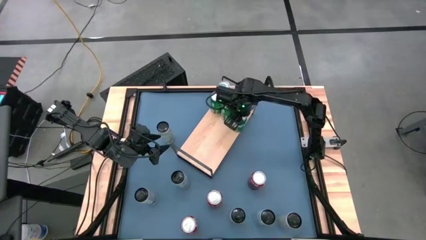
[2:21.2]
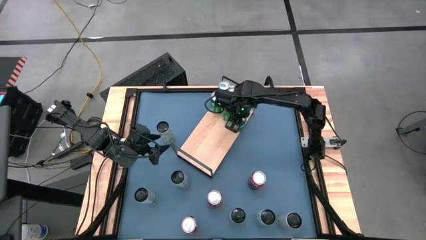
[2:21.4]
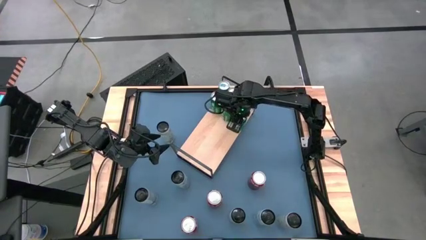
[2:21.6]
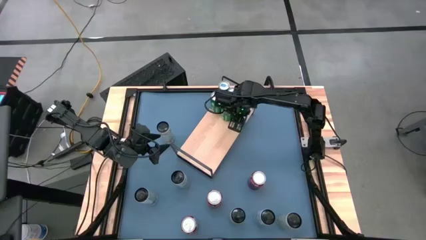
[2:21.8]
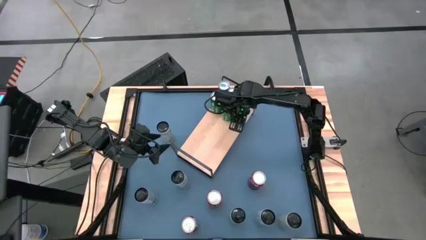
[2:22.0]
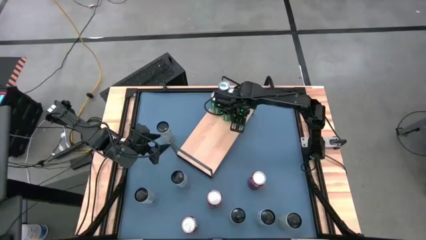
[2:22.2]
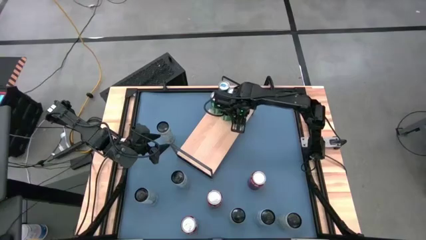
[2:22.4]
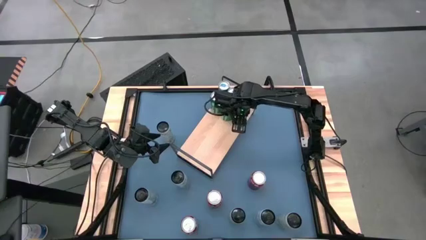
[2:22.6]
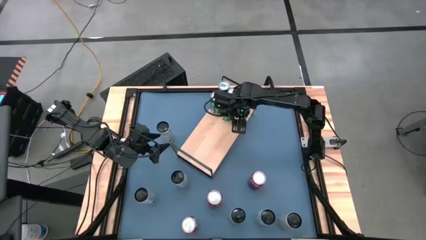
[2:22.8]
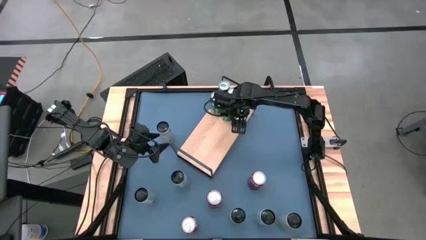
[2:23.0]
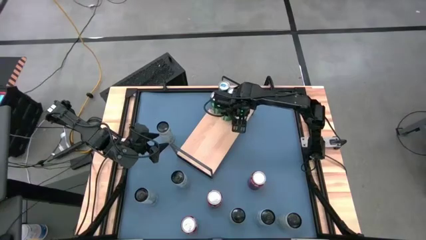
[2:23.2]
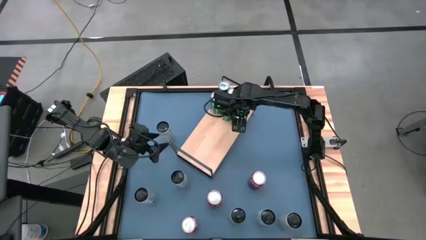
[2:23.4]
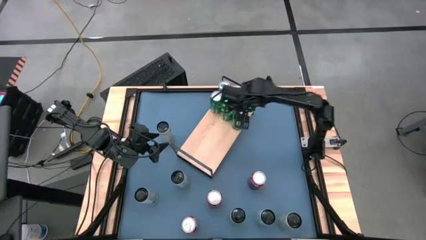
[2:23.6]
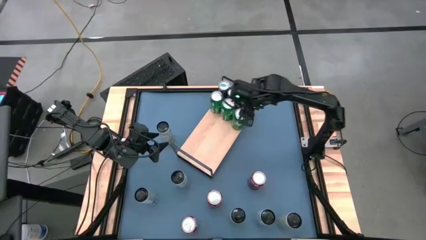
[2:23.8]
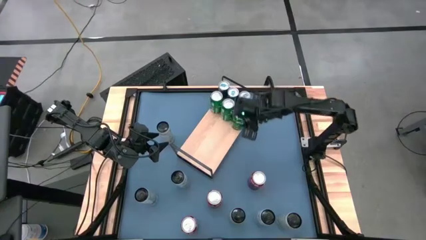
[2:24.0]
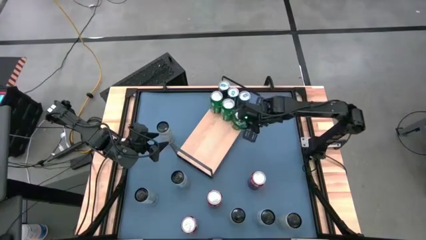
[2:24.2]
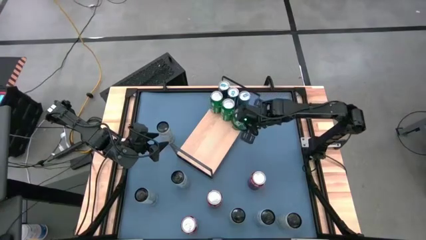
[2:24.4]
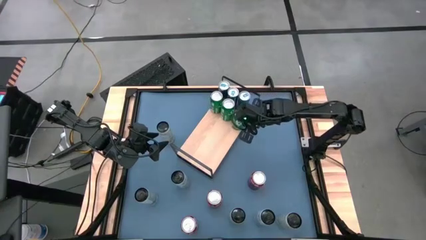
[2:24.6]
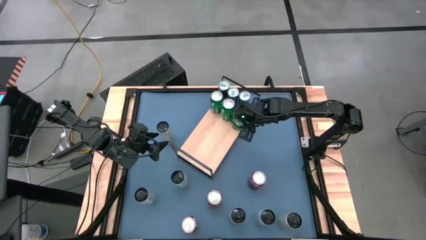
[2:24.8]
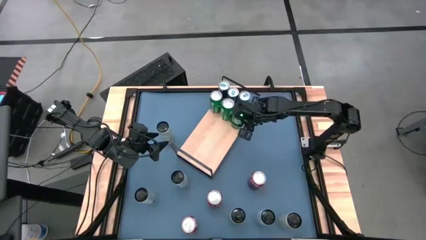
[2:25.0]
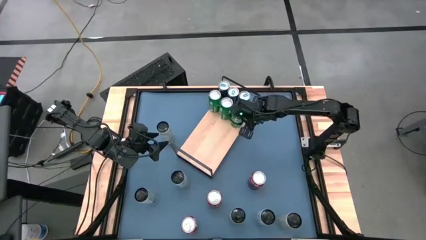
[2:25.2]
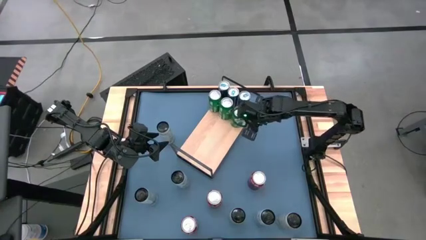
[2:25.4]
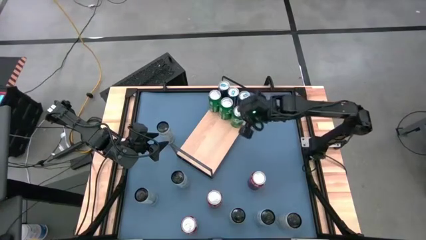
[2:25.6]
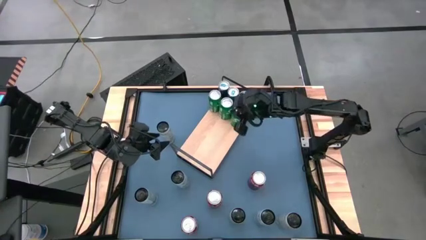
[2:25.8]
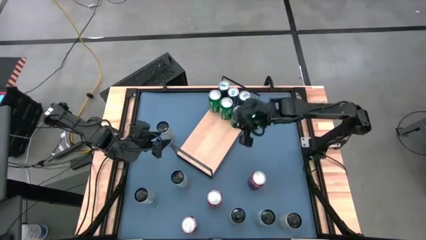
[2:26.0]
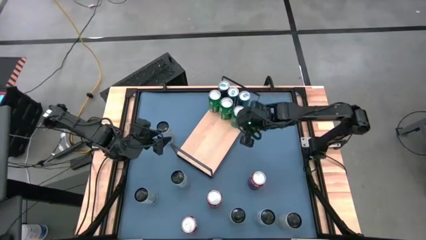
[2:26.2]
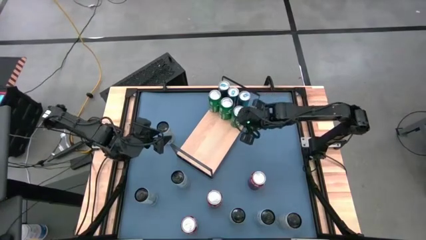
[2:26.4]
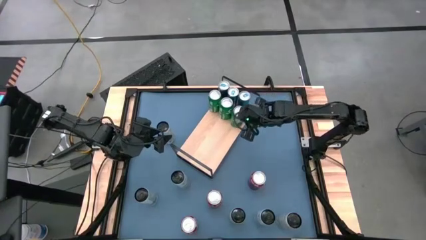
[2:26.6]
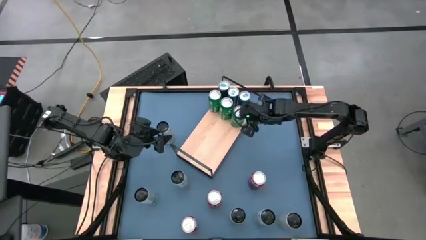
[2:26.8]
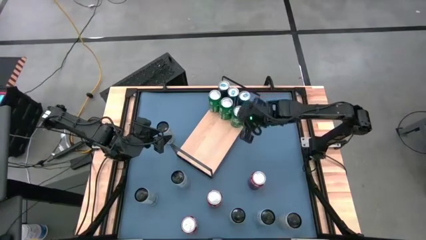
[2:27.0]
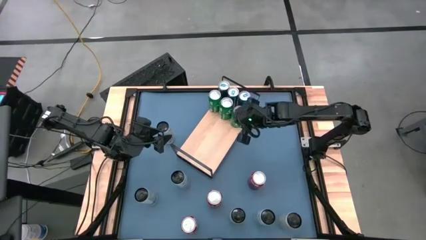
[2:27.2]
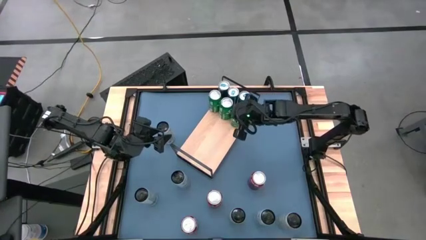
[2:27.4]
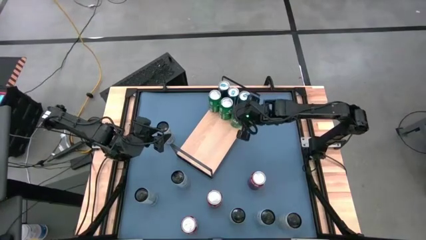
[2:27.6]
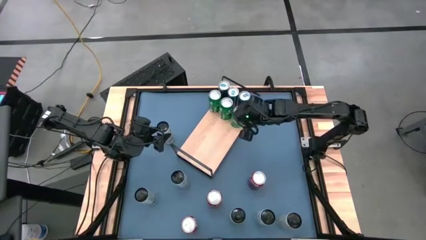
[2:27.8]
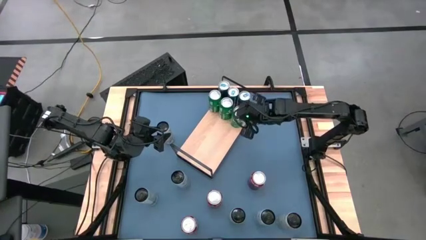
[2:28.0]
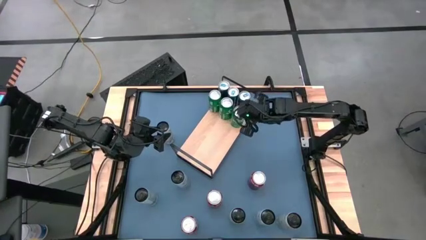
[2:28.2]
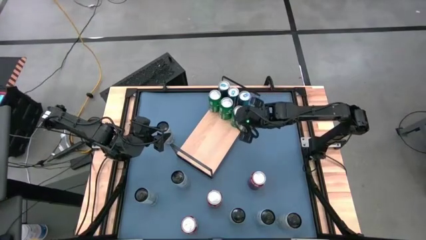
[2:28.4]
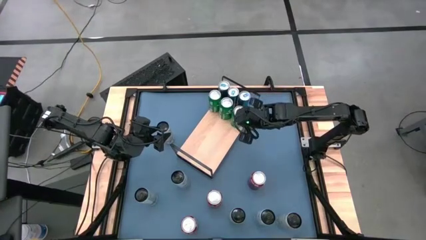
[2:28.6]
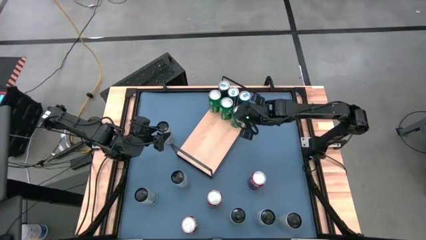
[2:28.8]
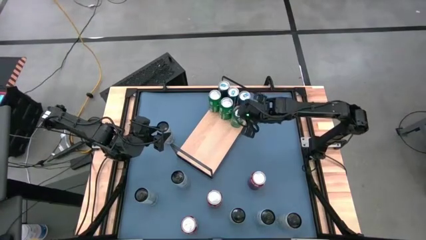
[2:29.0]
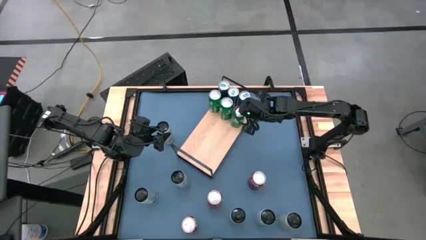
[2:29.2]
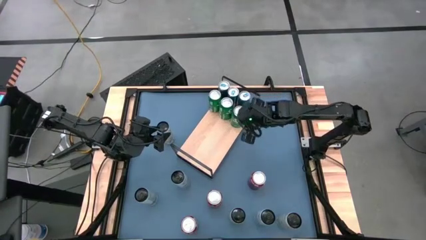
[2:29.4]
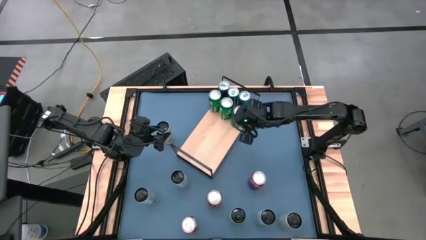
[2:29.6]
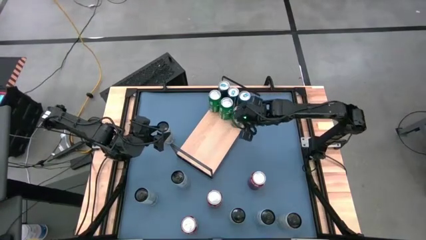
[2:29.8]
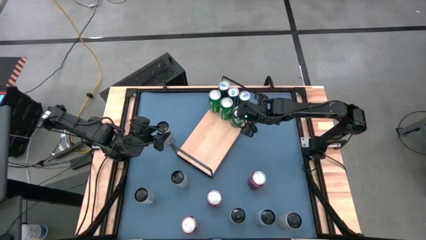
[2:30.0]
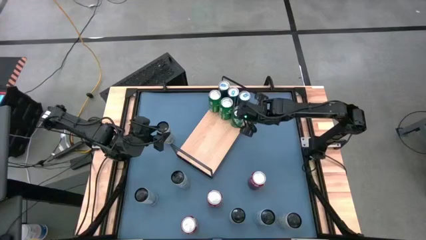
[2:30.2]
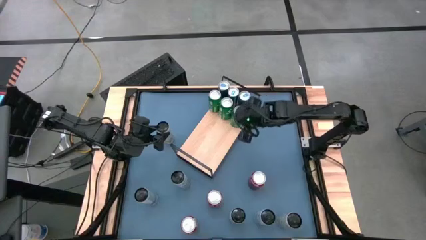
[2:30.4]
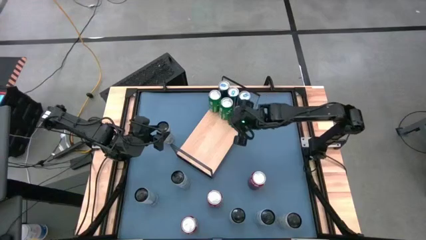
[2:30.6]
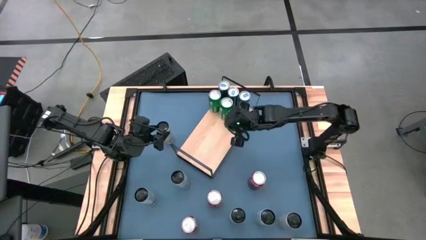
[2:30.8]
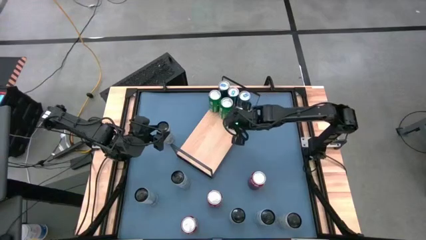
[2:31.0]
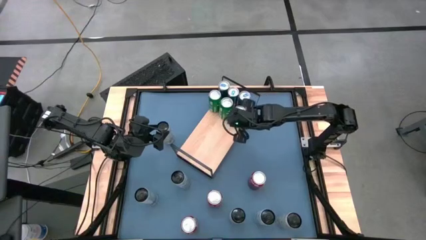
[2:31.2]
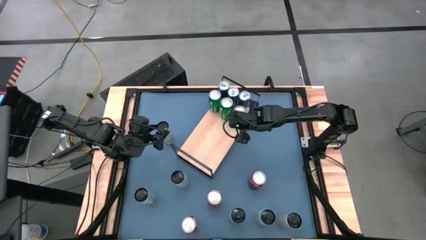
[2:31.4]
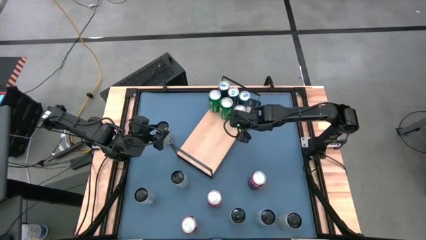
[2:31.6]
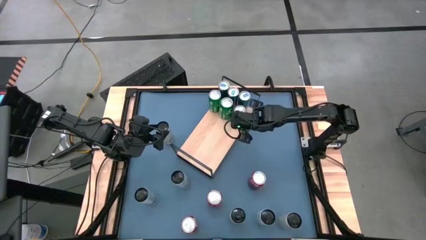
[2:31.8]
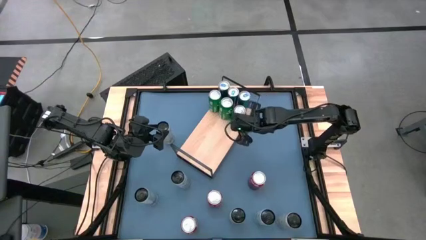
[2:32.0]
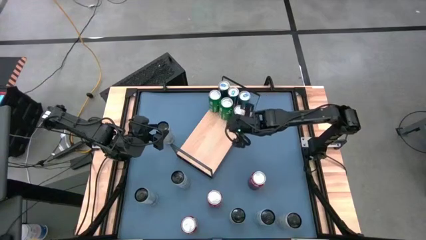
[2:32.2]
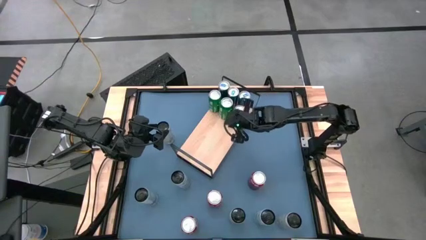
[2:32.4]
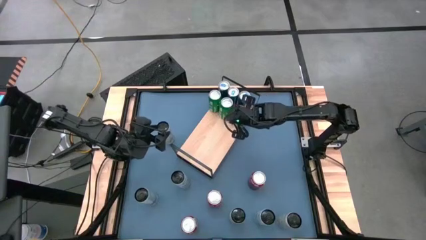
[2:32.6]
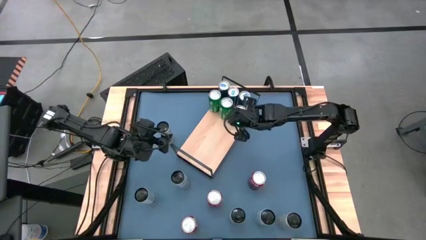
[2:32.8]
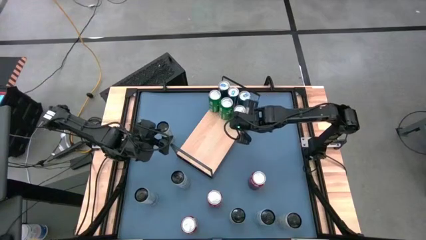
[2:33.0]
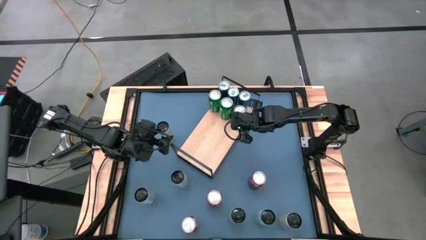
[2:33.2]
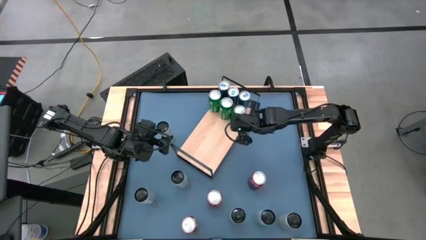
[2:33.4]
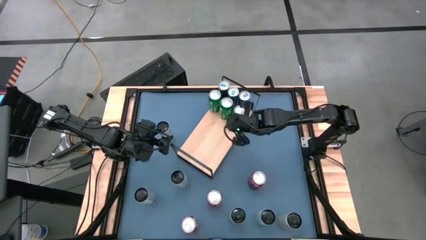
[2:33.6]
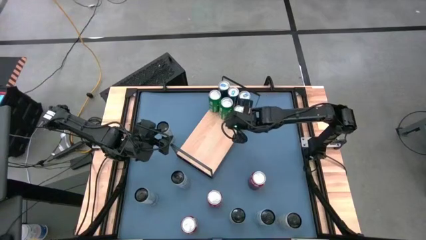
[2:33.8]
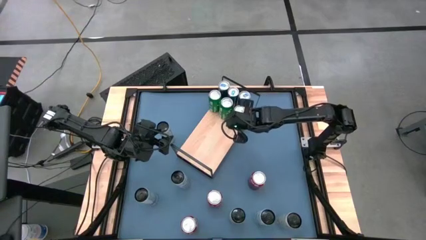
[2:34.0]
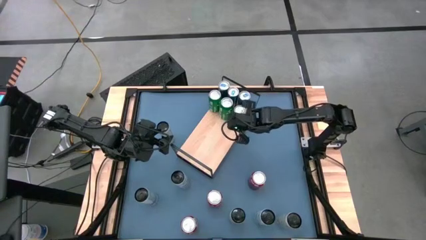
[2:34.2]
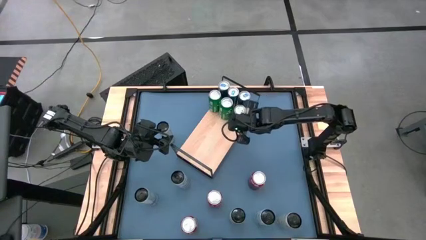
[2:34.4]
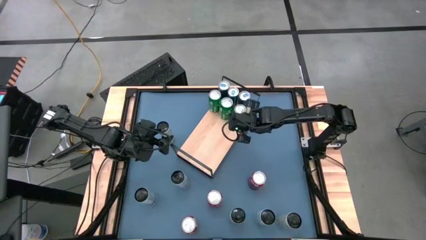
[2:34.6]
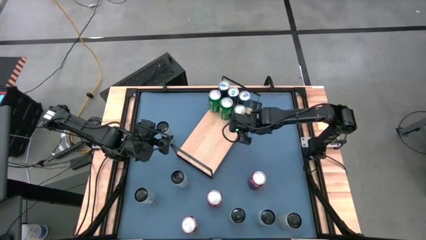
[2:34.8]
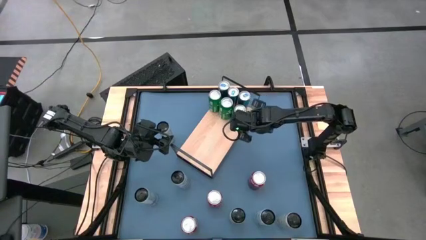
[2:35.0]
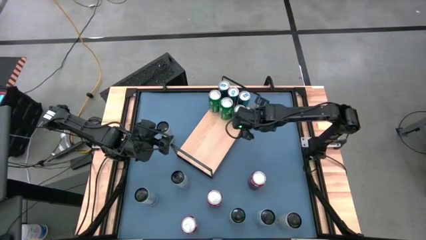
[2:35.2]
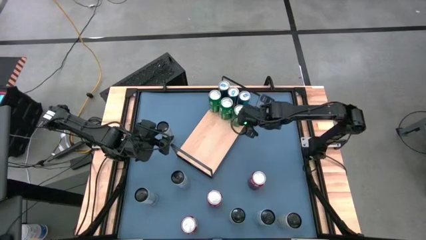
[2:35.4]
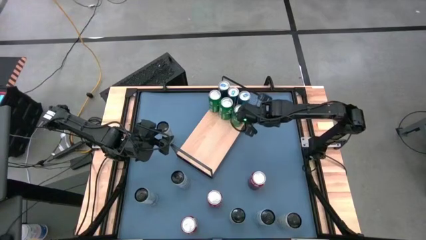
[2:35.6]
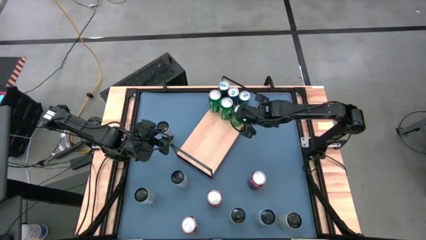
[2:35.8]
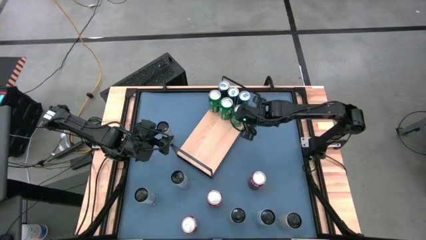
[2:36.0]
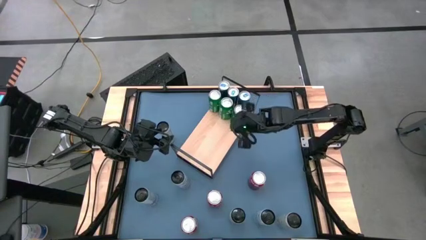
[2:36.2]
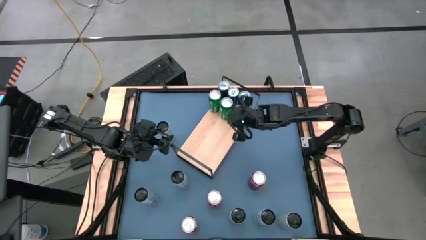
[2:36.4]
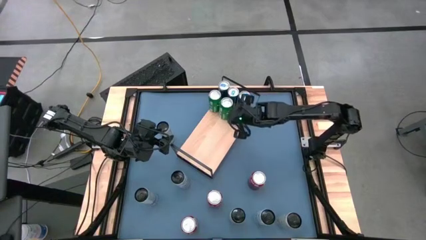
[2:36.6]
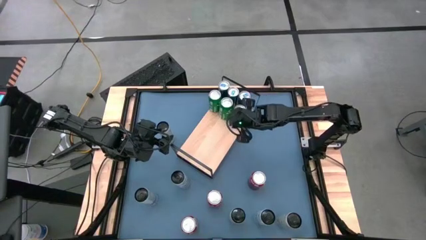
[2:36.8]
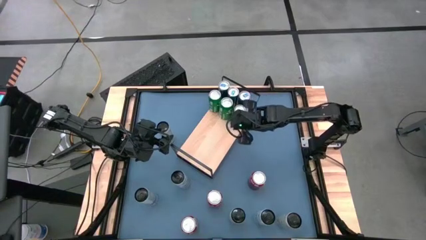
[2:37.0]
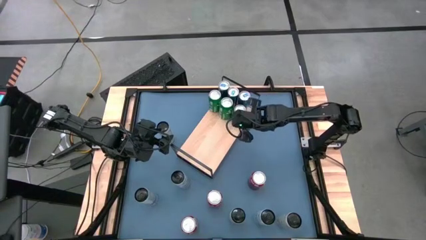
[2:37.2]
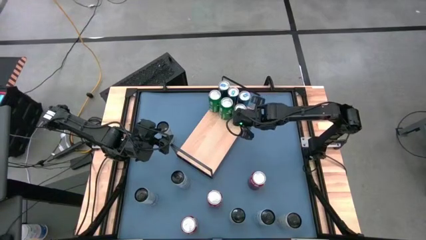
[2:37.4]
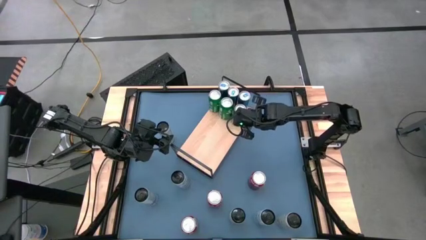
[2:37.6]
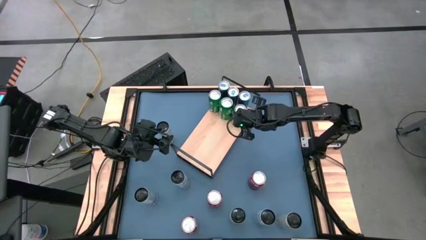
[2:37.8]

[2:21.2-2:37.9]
Task: Place canned beverage on shelf
Put green soda can on the shelf aligned with the other green soda cans
